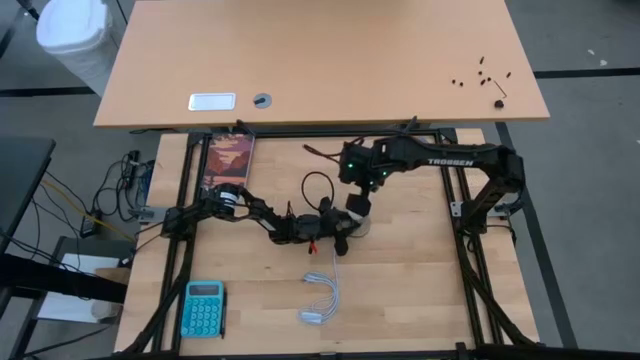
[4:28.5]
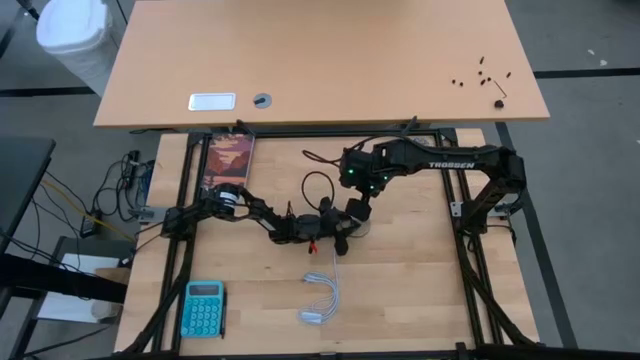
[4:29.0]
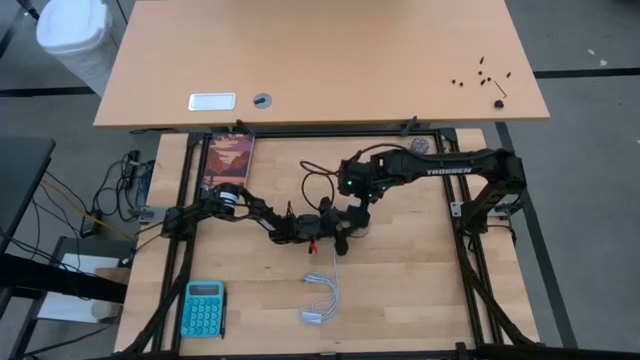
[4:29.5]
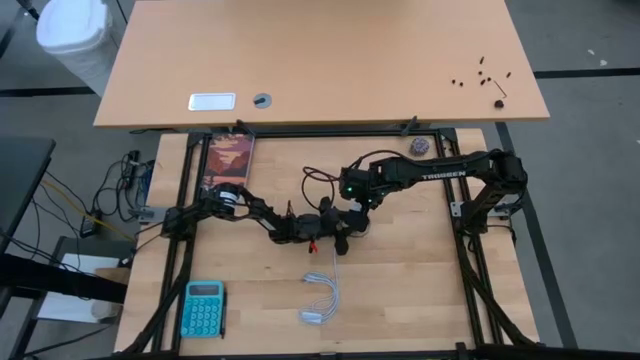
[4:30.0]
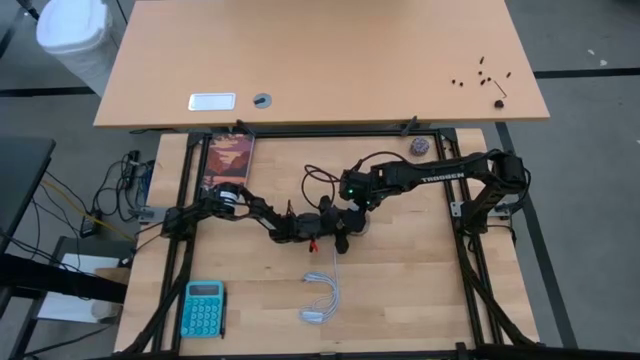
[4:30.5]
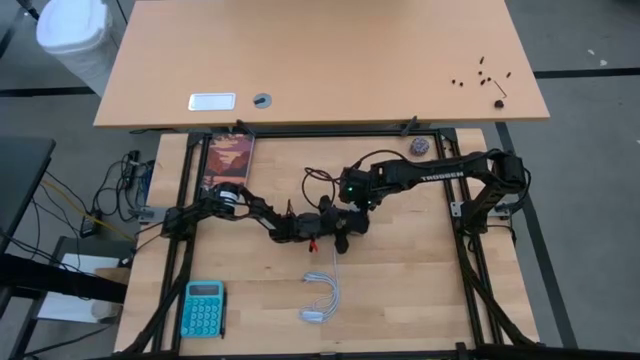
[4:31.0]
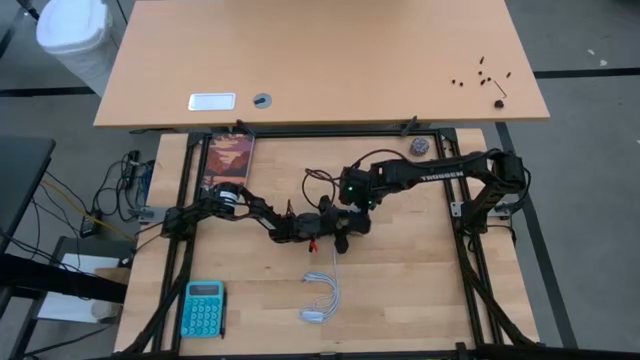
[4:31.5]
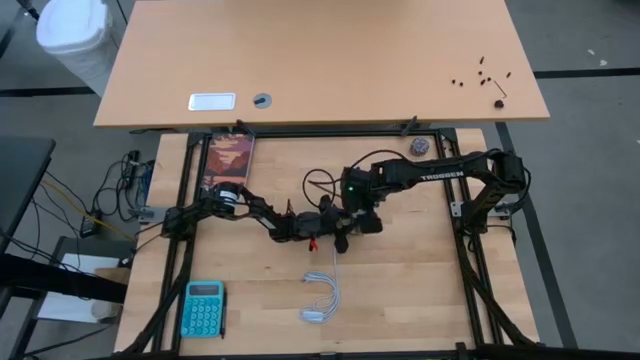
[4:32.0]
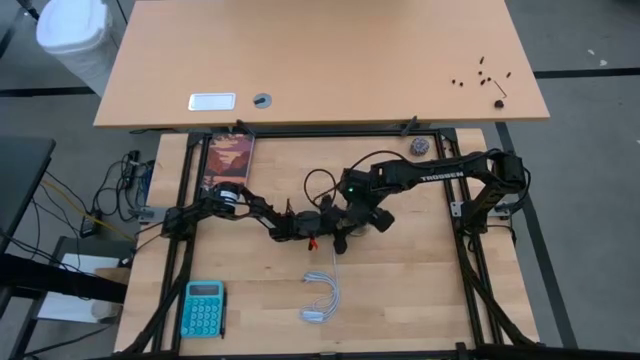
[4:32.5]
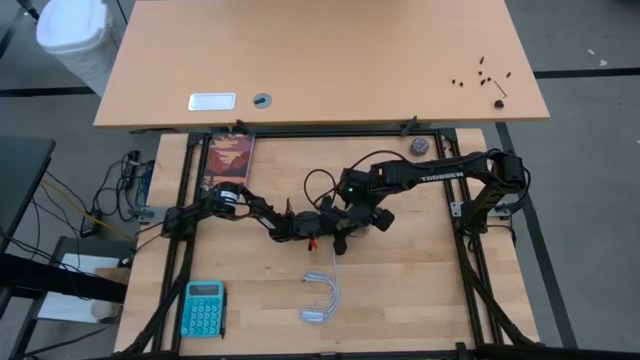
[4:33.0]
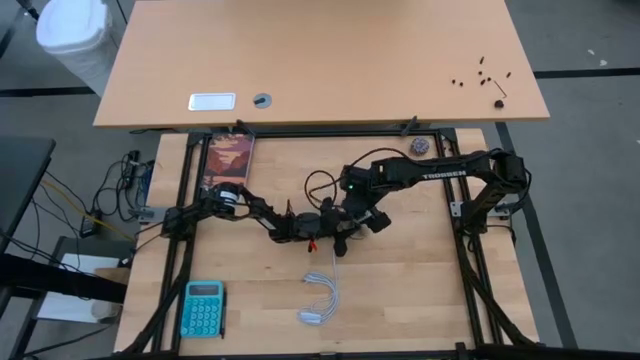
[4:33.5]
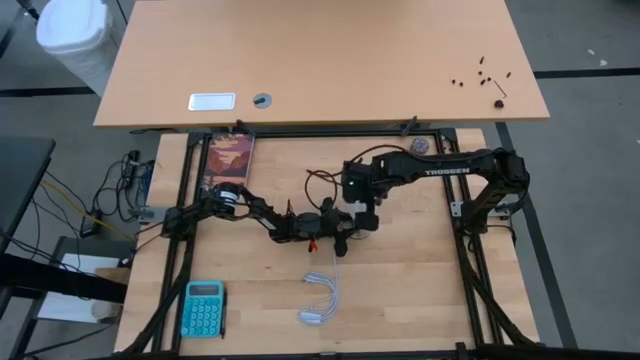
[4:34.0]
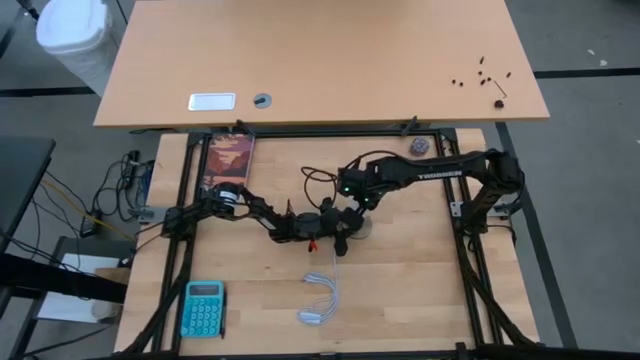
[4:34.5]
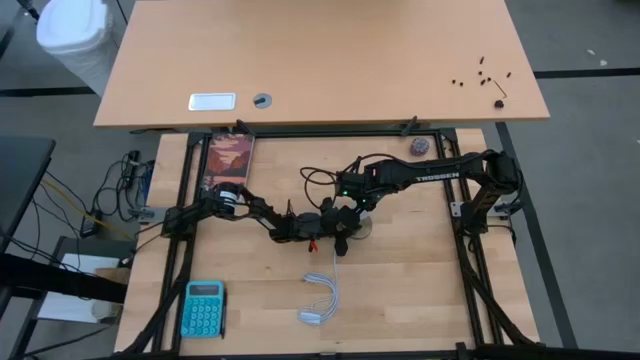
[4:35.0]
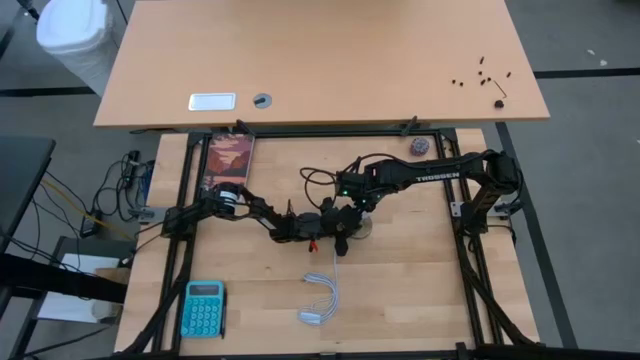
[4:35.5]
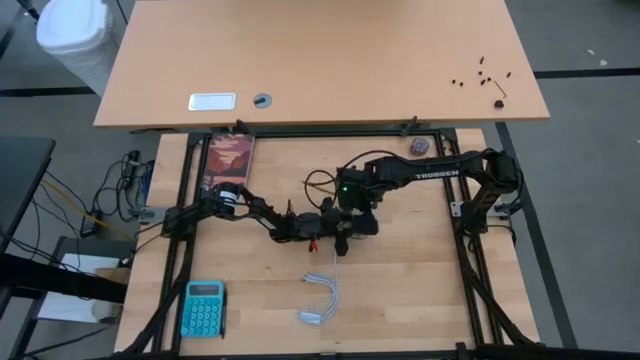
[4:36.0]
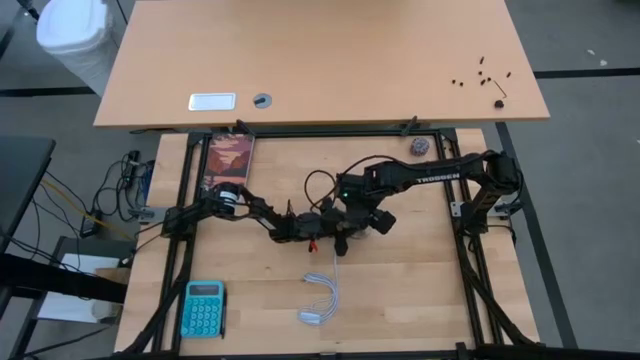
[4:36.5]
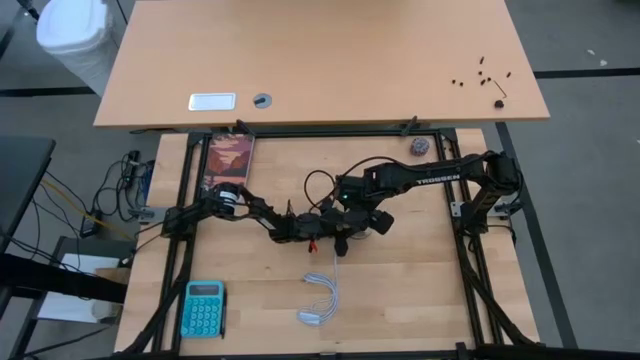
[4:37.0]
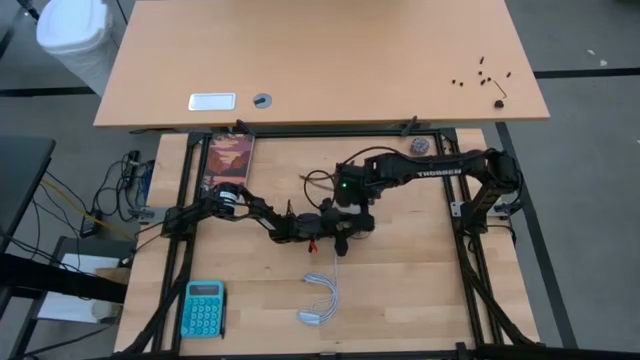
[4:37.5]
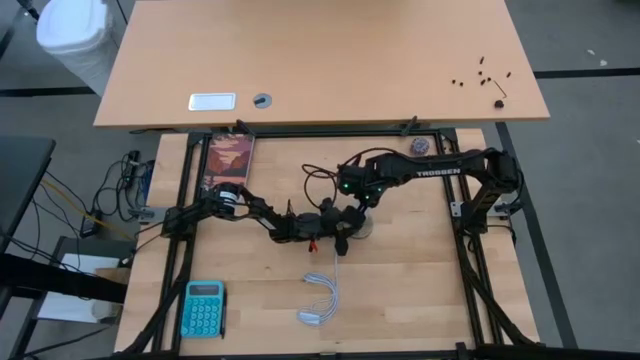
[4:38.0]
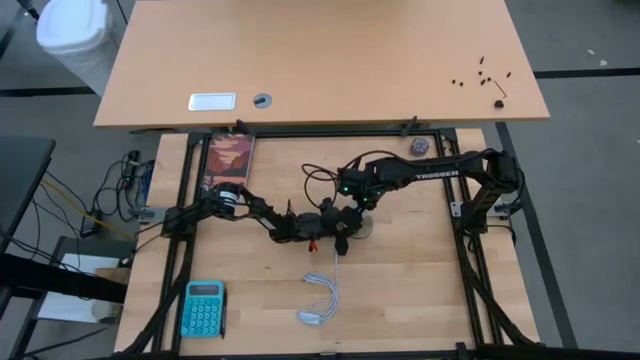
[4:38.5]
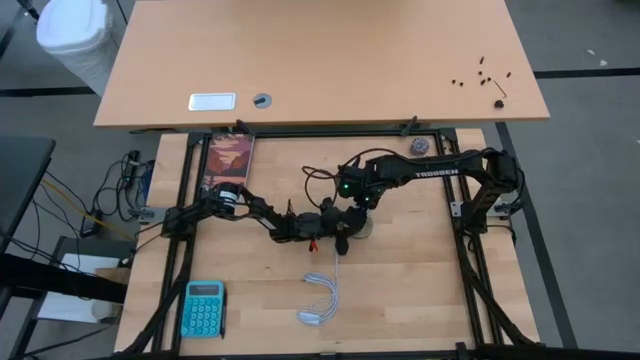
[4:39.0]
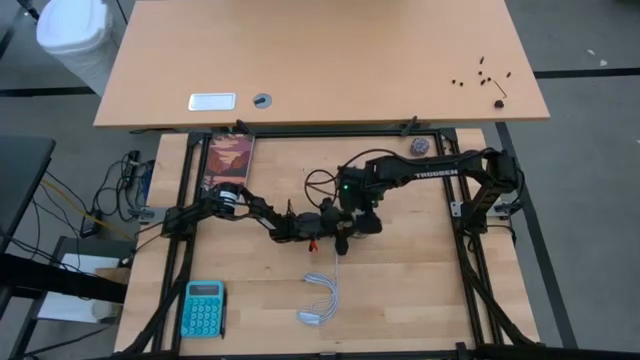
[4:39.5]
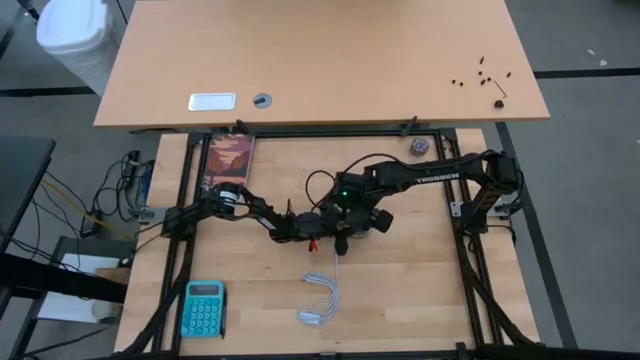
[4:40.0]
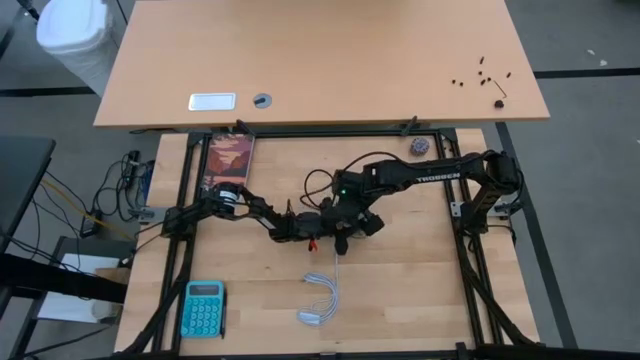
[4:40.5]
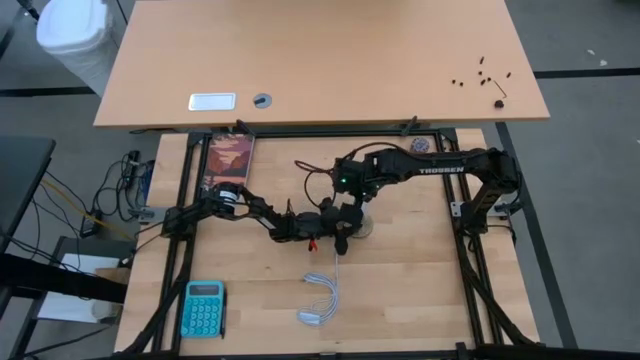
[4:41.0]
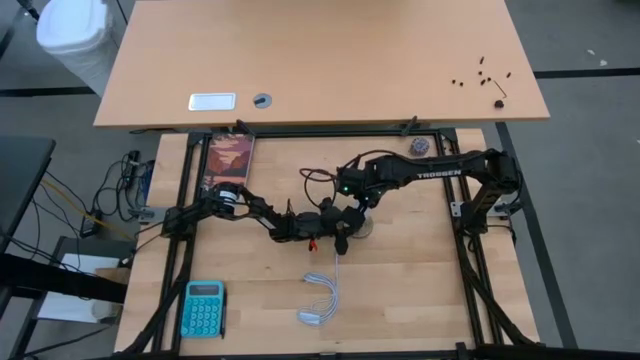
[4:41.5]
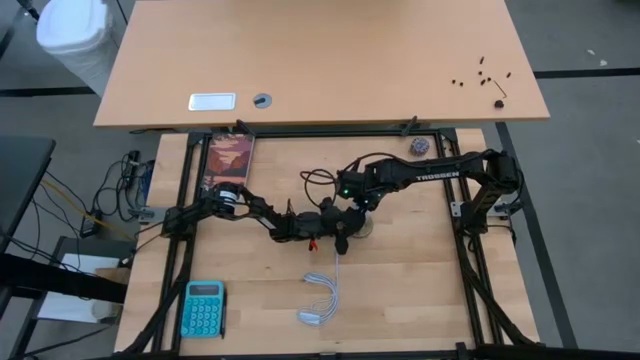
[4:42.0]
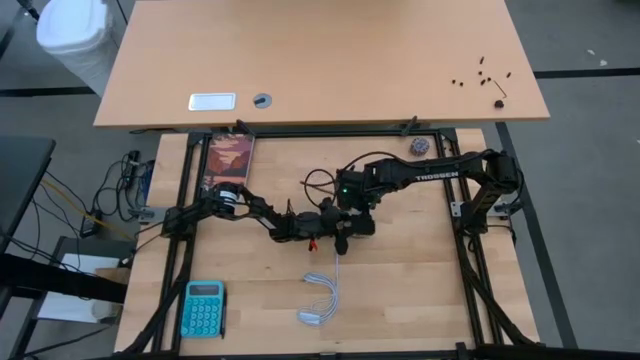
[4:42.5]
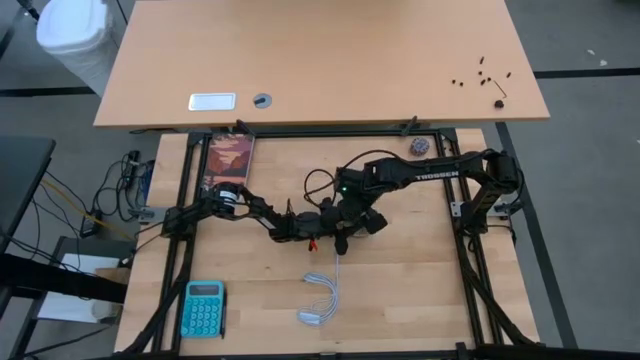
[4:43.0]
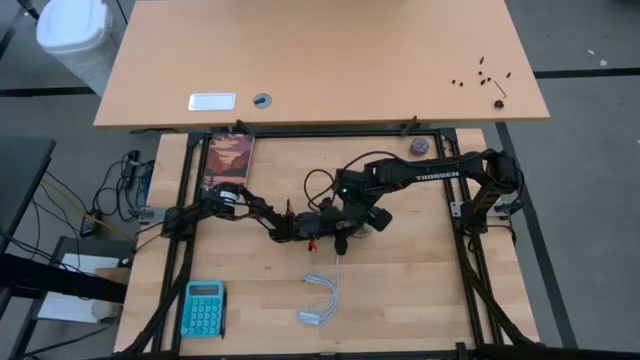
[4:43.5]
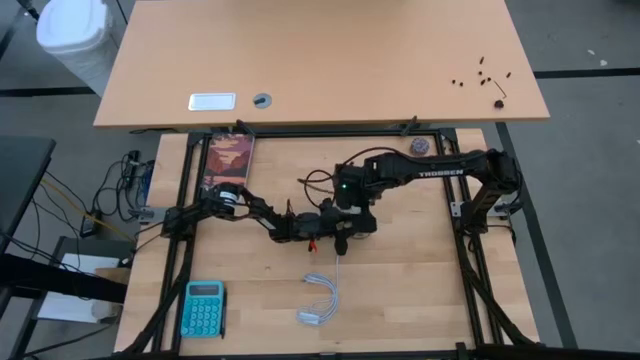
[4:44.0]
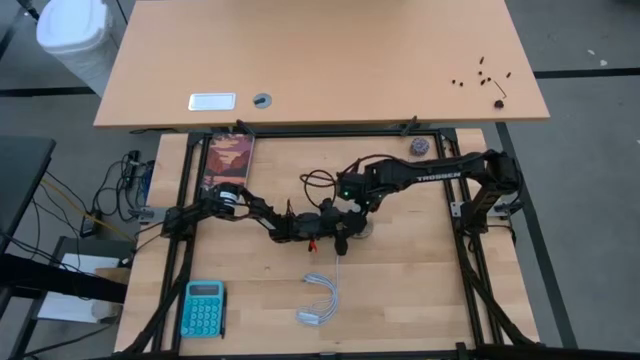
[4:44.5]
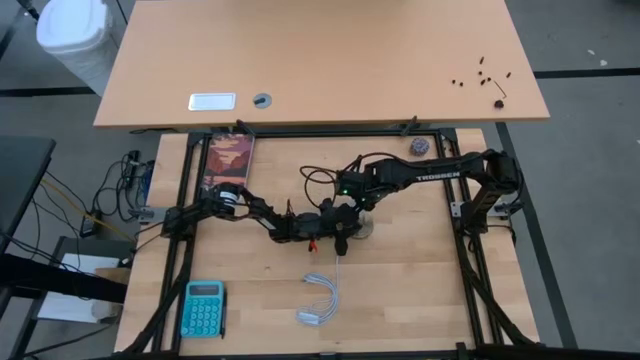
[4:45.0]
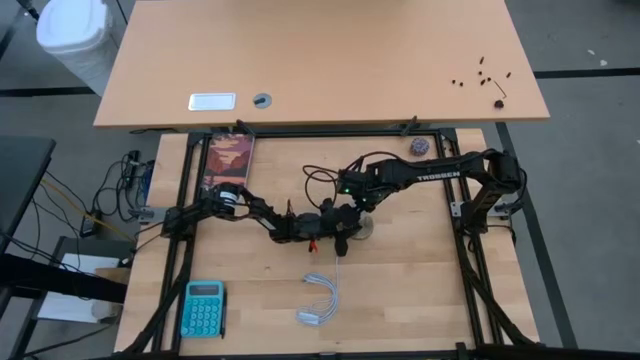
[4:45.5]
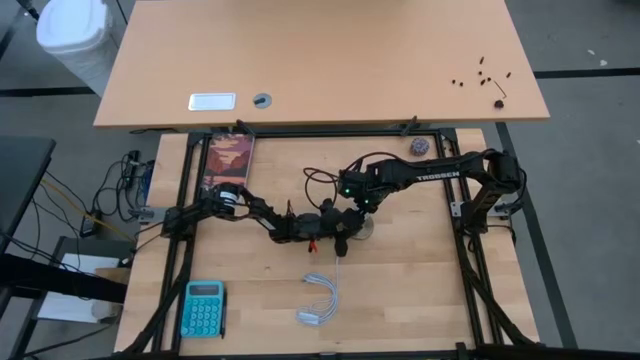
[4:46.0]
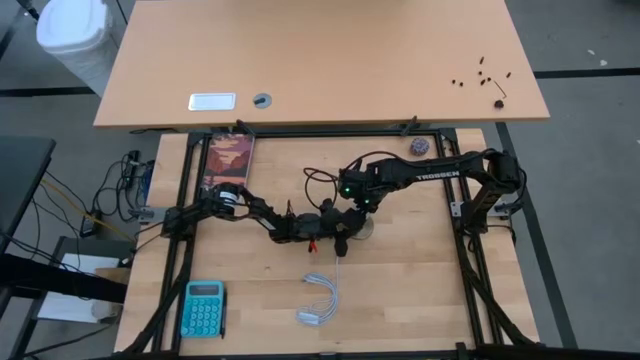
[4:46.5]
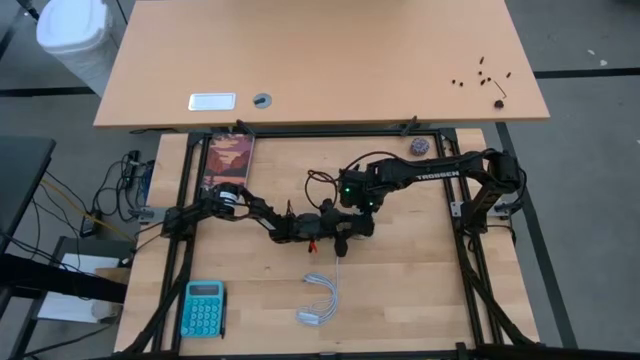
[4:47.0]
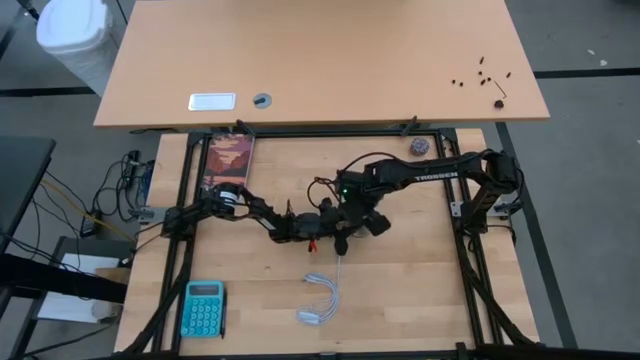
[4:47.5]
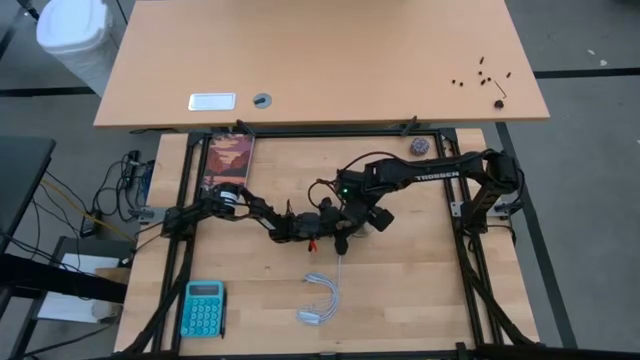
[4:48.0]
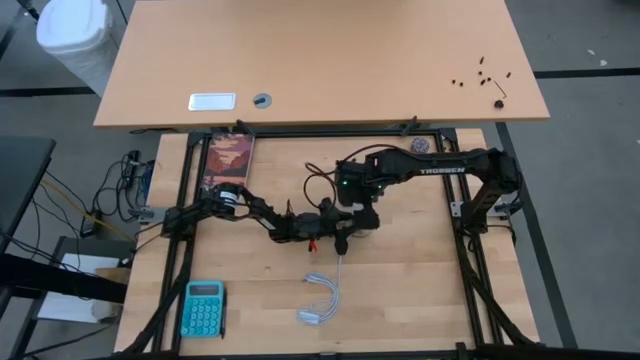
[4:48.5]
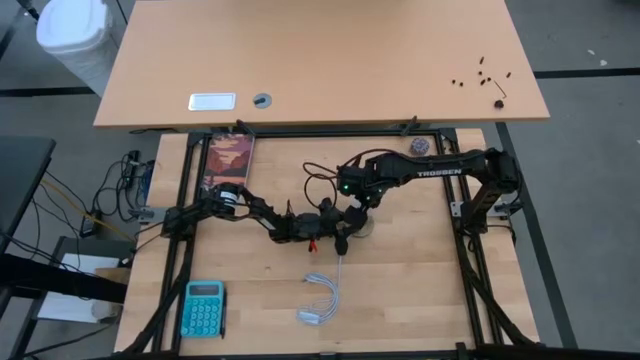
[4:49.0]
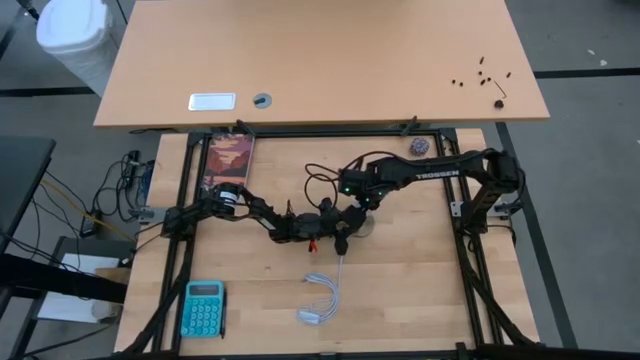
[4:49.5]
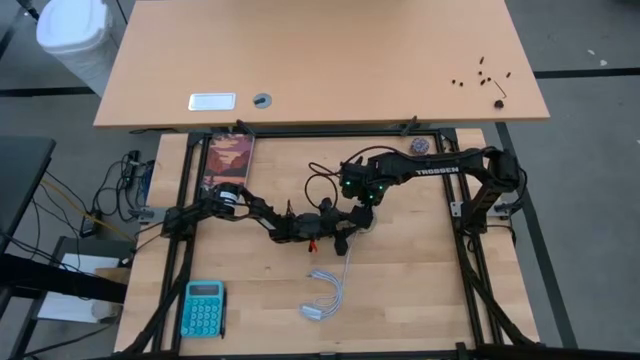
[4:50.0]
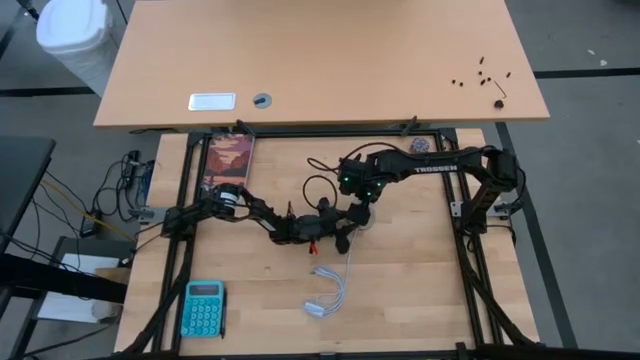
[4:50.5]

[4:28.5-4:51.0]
Task: Screw lightbulb
Remove the lightbulb on the desk lamp
